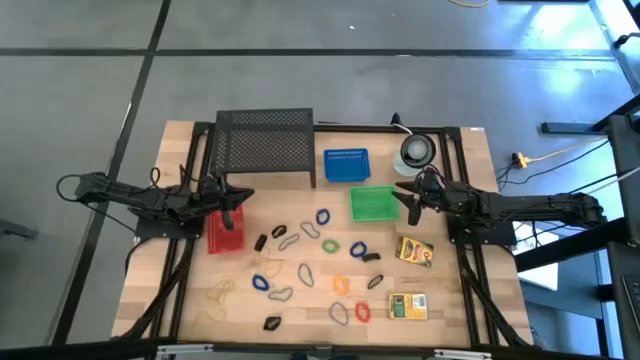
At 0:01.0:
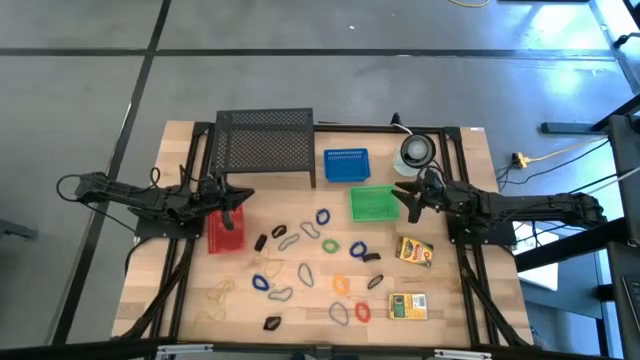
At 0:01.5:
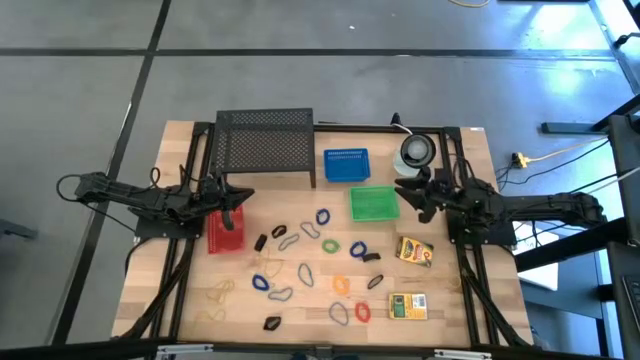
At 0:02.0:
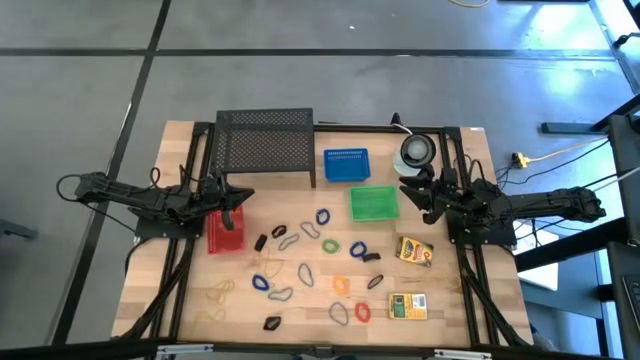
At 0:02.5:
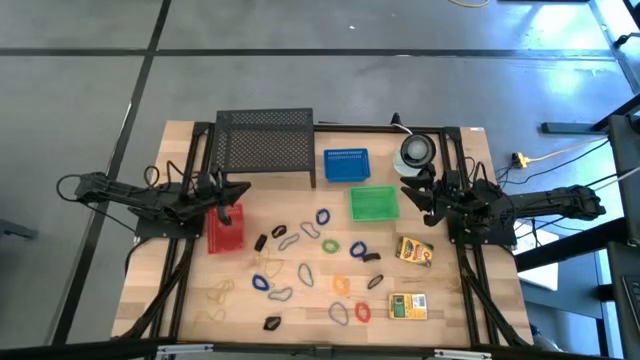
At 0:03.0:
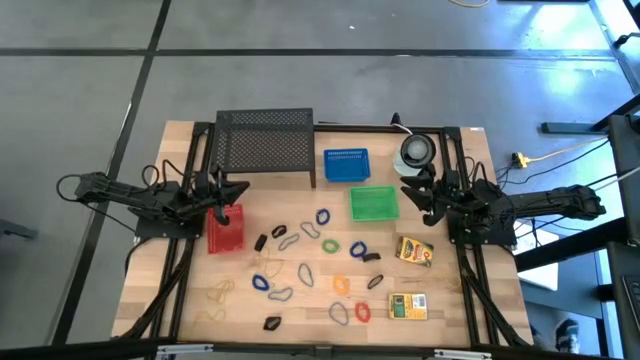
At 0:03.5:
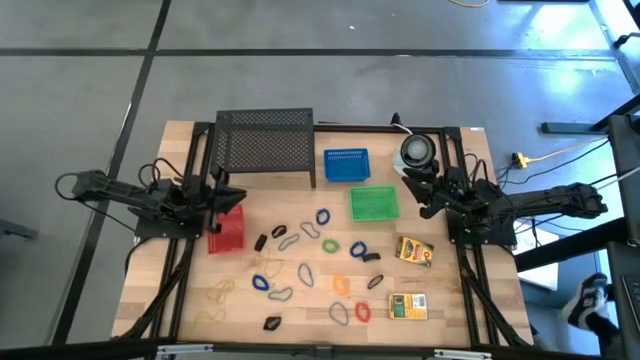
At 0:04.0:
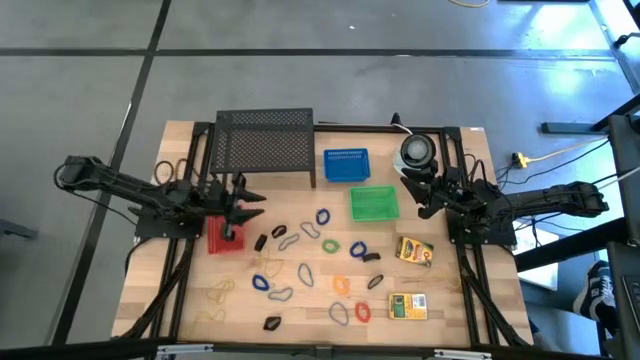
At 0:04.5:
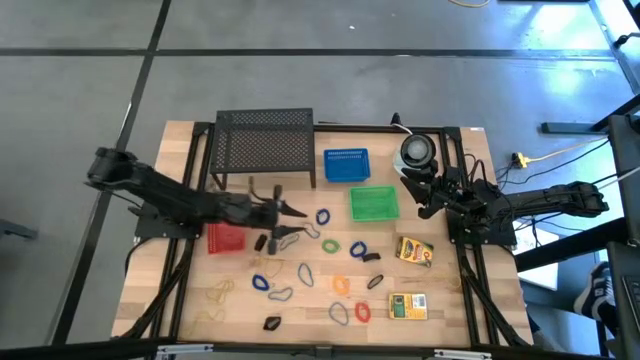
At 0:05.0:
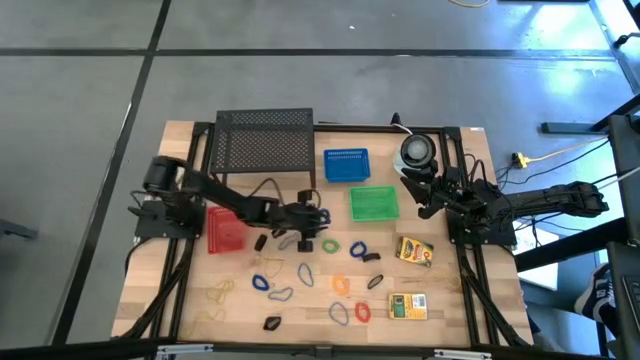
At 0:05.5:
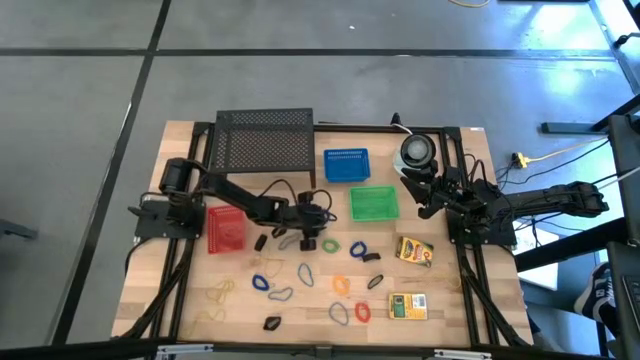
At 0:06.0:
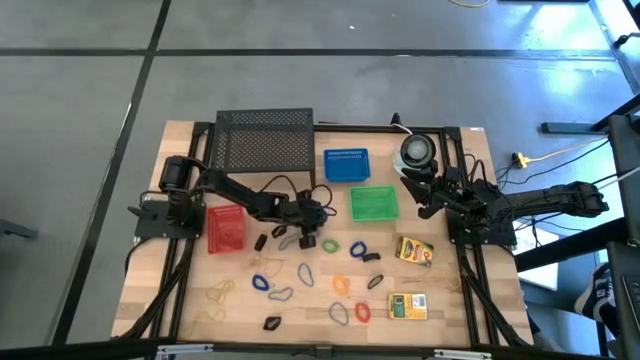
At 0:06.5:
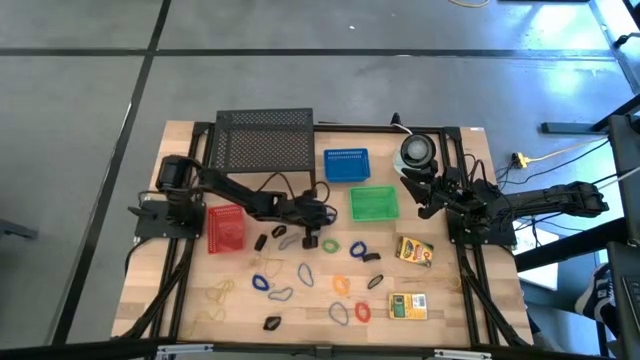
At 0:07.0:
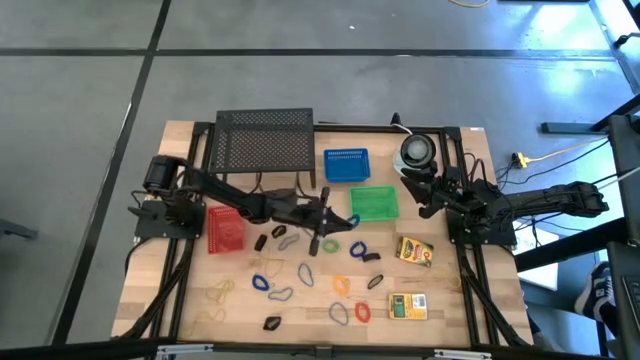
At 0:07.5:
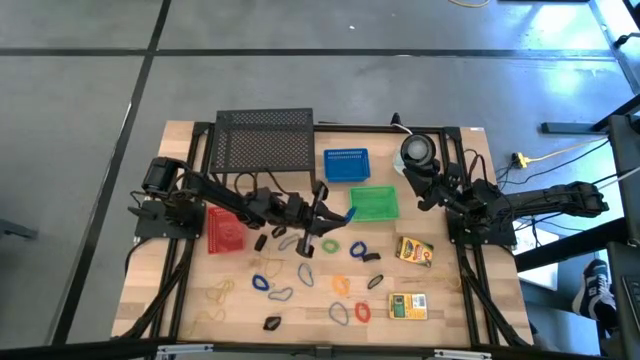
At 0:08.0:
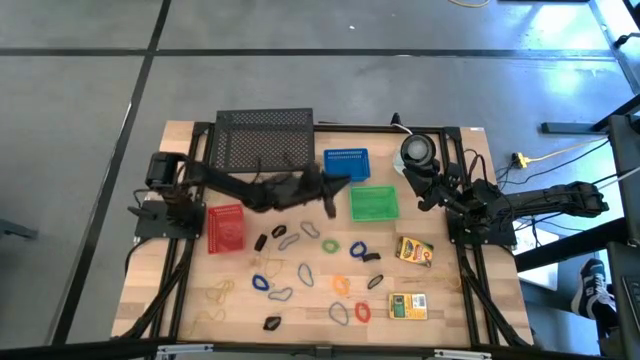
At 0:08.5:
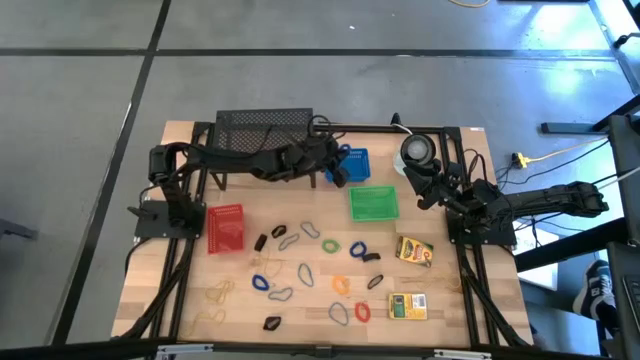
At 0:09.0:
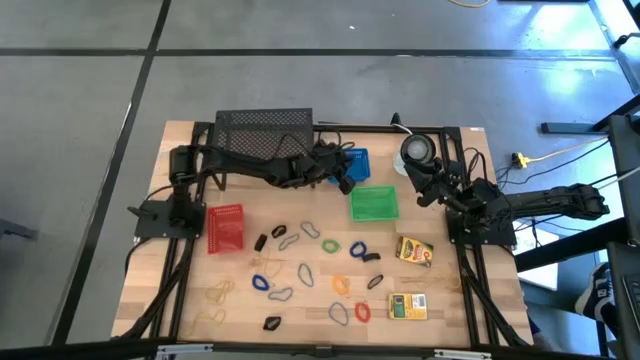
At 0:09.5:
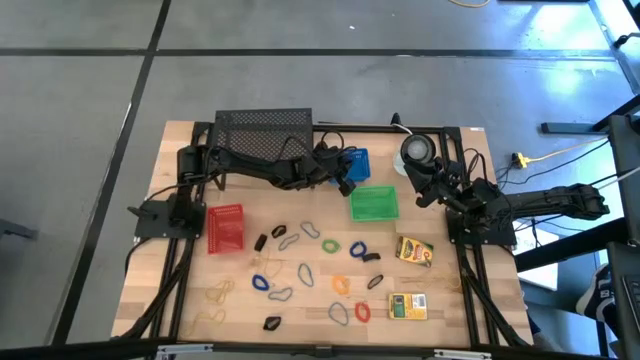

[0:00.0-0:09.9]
Task: Pick & Place Office Desk Supplies
Put the blue spring keychain into the blue basket

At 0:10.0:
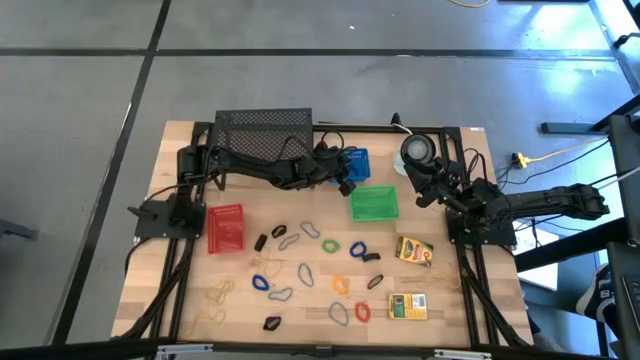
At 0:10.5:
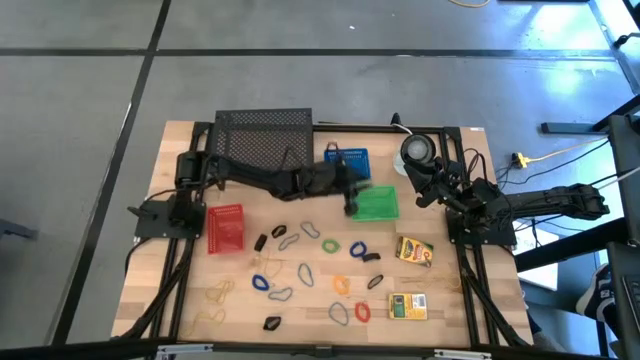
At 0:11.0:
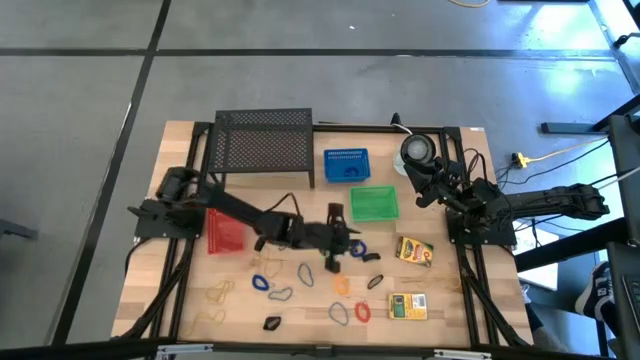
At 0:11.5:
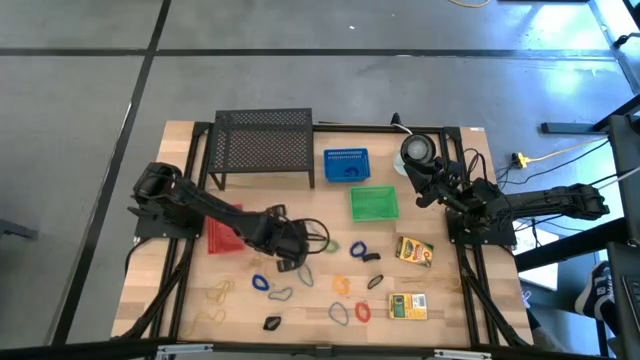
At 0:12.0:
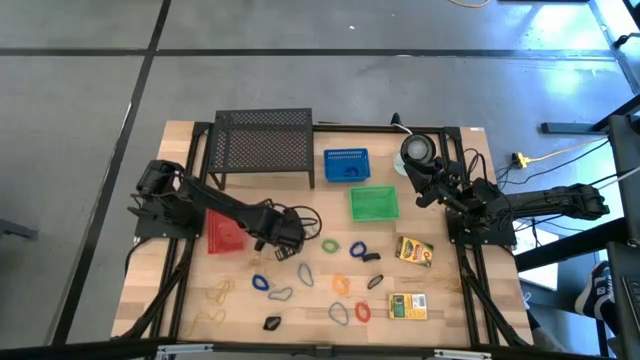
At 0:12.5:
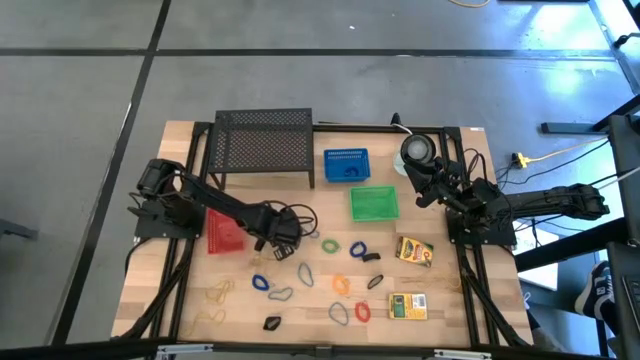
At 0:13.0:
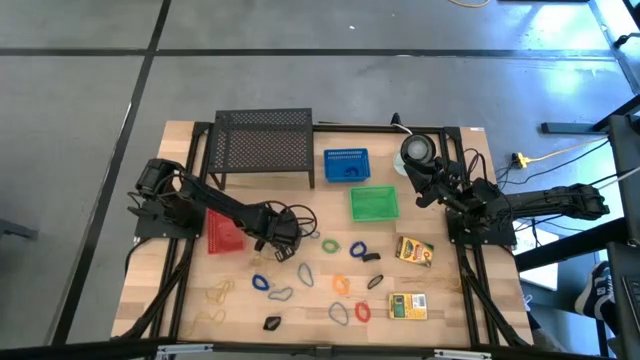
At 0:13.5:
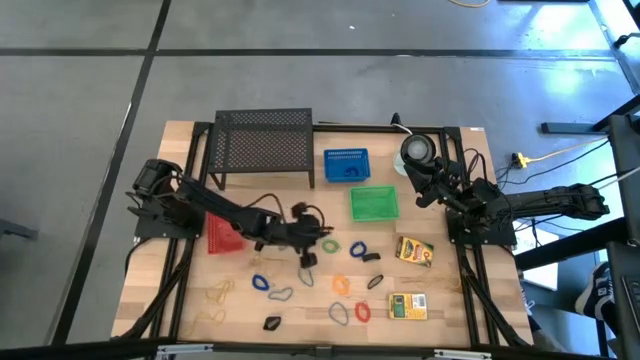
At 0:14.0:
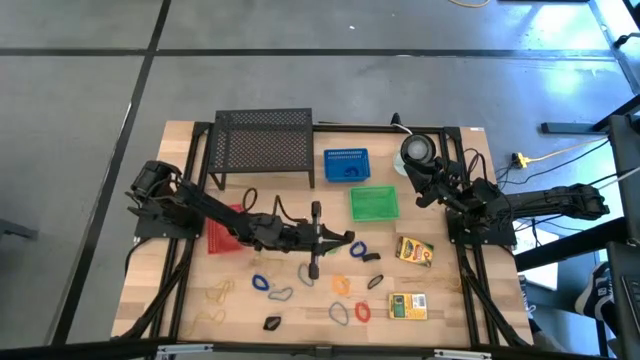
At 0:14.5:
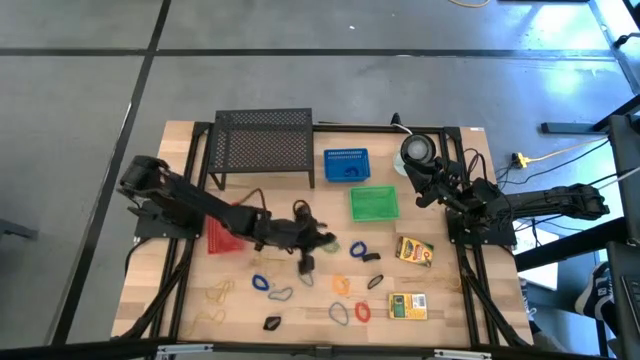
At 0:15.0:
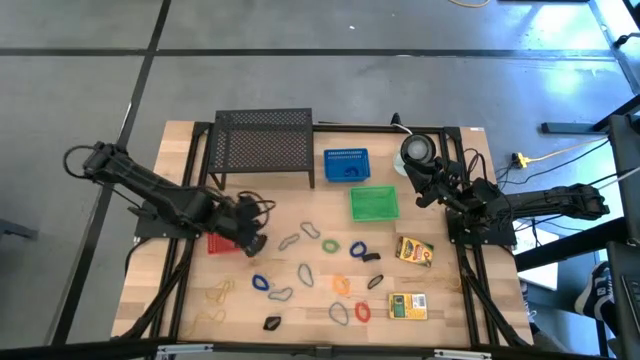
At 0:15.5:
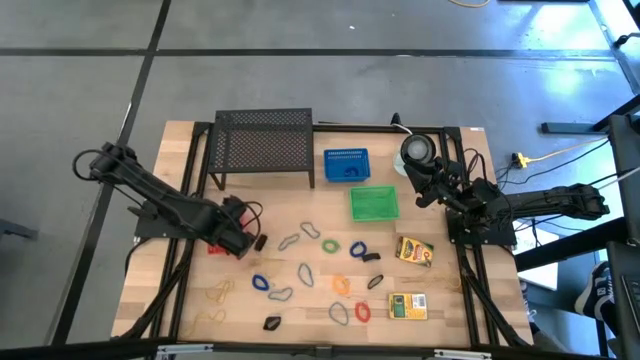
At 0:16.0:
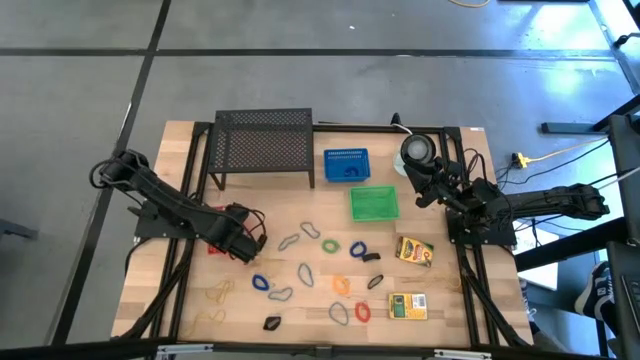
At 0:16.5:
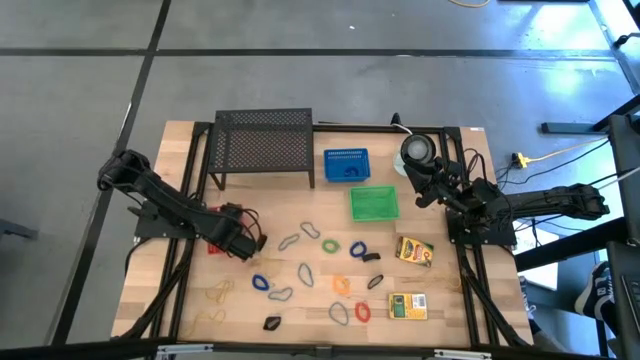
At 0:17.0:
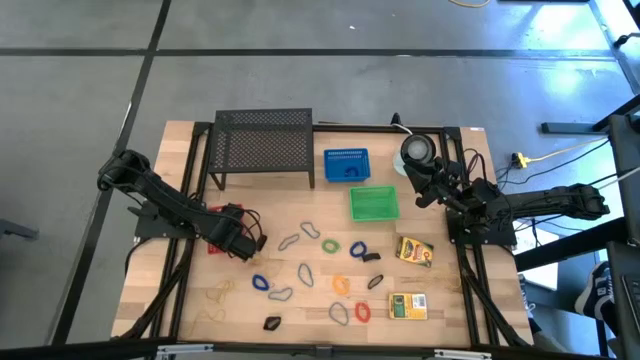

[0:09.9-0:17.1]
Put the black rubber band into the orange basket

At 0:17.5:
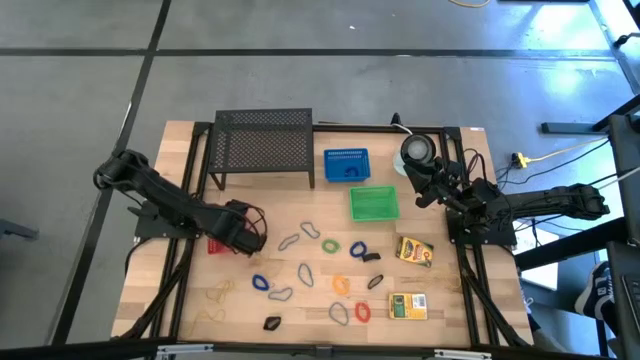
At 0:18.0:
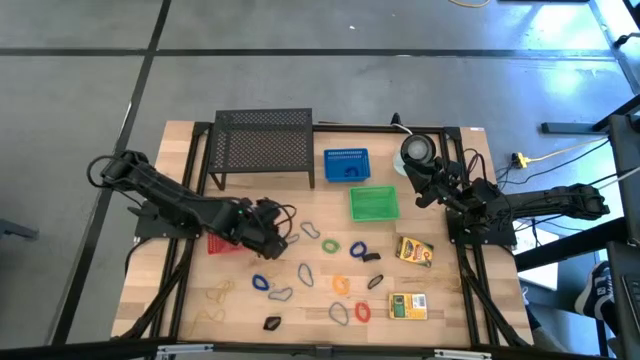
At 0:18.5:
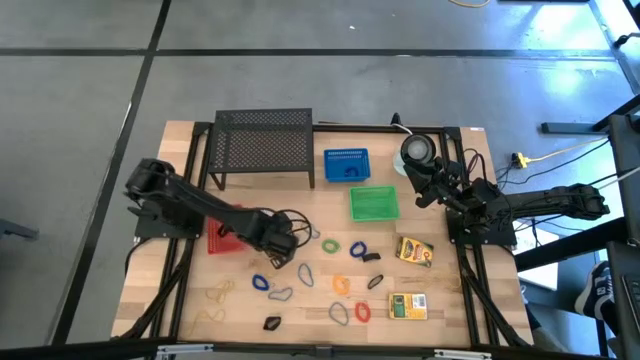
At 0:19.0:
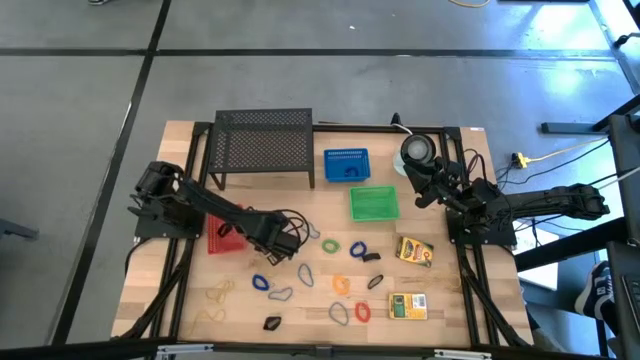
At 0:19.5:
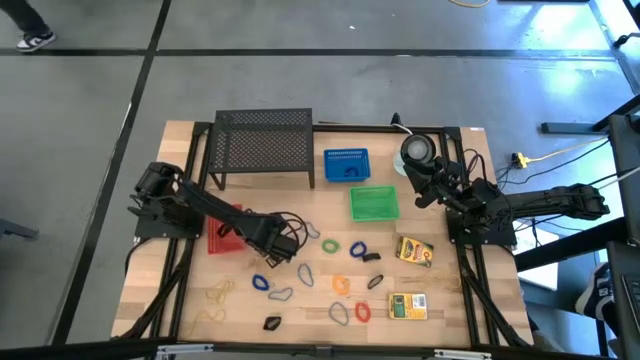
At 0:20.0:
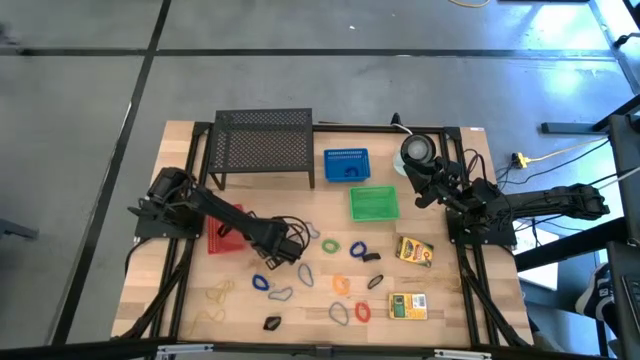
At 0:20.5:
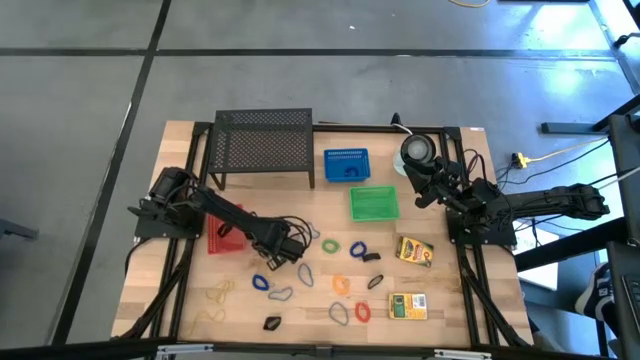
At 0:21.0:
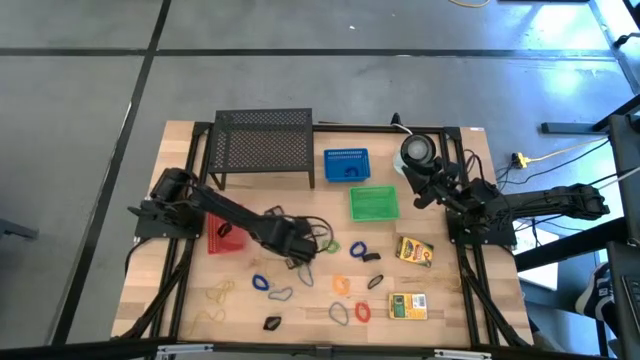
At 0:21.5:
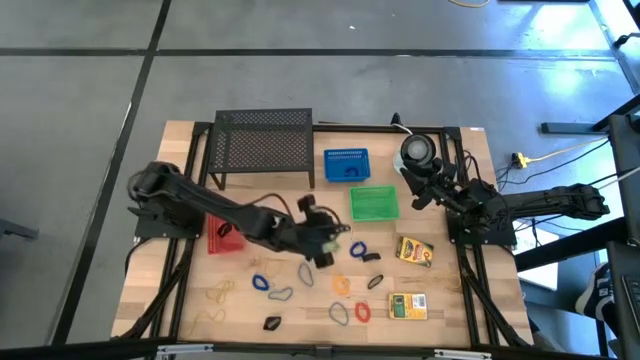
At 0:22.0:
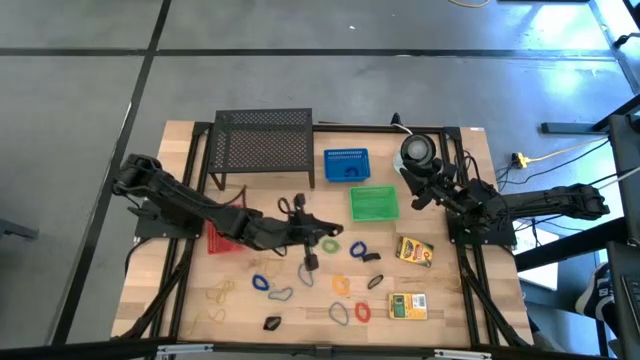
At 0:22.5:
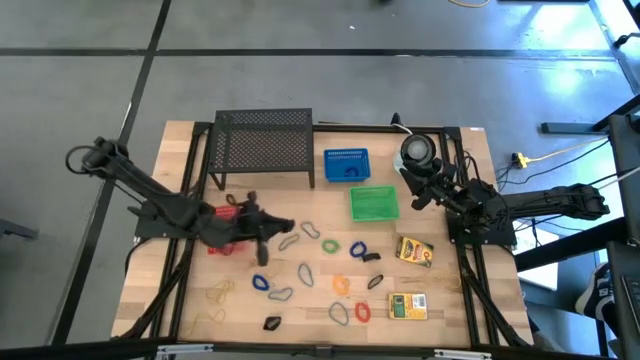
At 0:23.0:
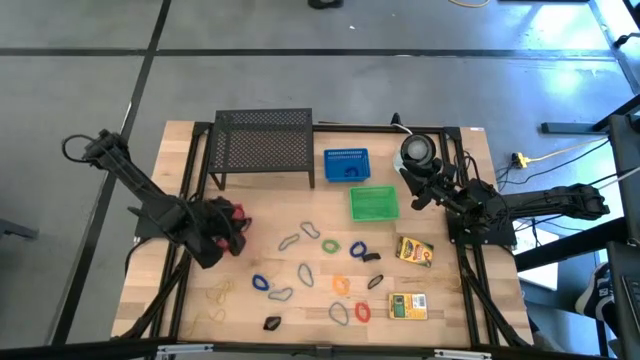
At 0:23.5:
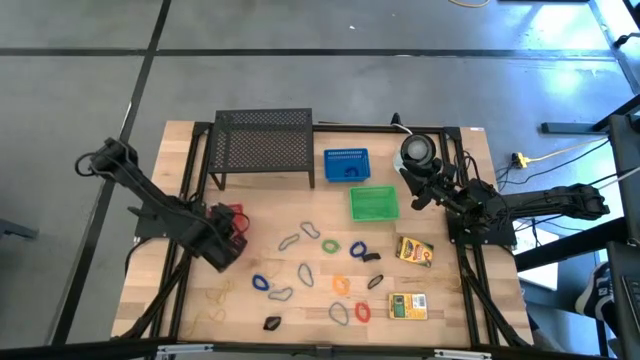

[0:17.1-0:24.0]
Put the black rubber band into the orange basket
